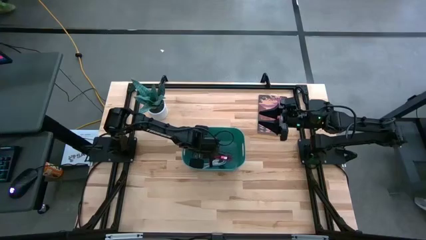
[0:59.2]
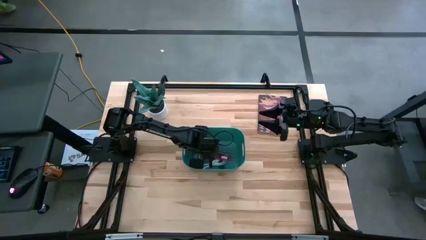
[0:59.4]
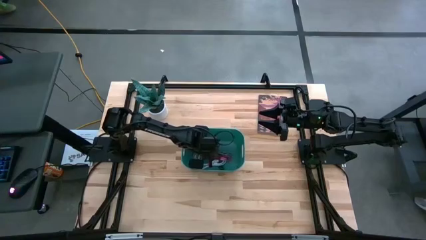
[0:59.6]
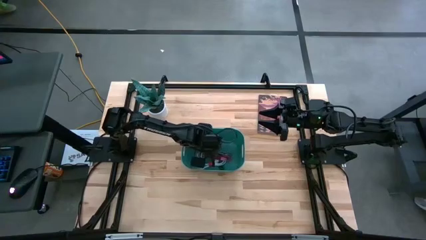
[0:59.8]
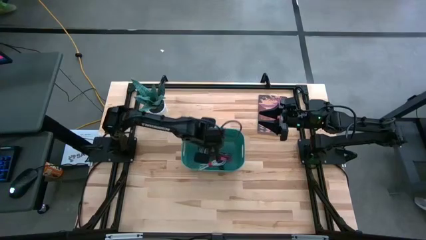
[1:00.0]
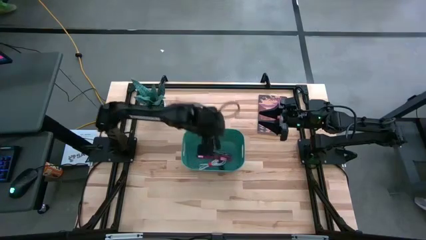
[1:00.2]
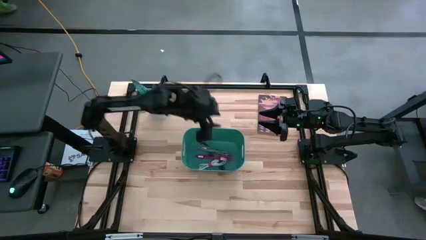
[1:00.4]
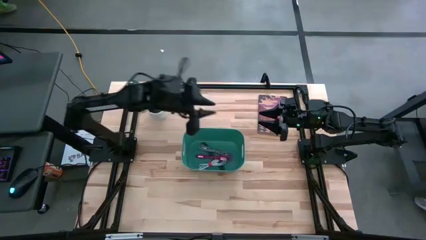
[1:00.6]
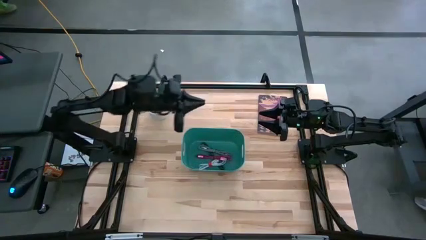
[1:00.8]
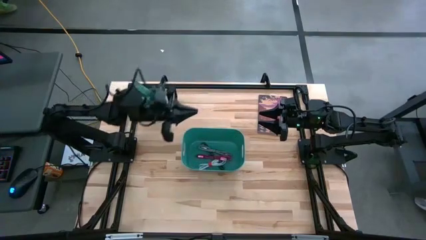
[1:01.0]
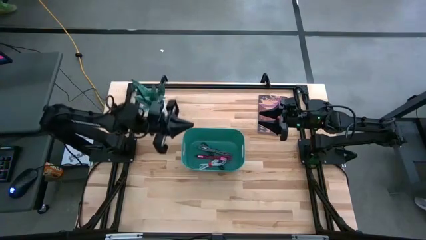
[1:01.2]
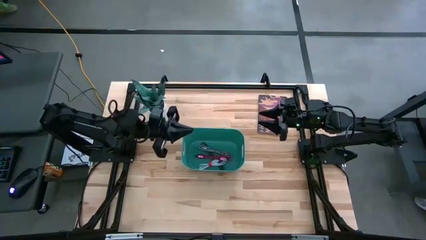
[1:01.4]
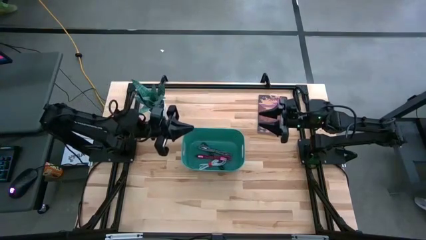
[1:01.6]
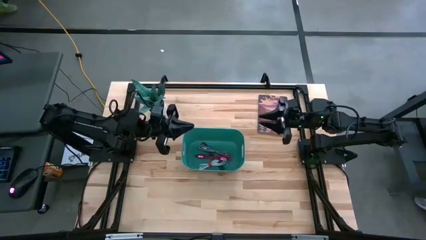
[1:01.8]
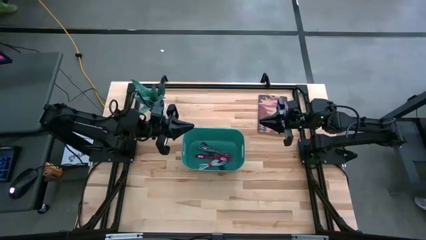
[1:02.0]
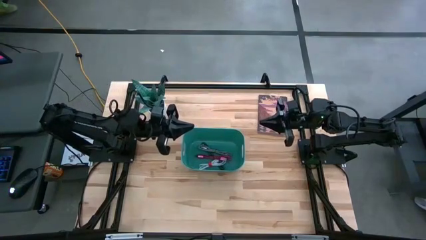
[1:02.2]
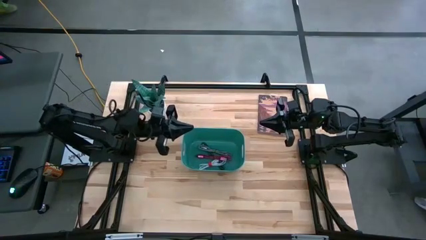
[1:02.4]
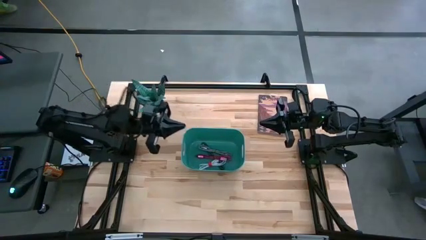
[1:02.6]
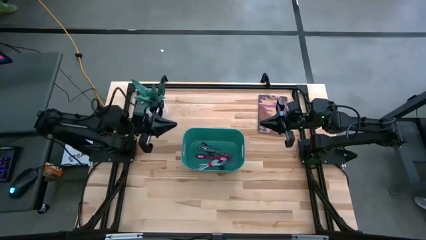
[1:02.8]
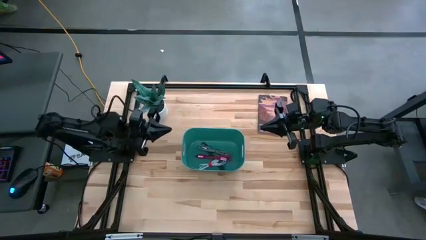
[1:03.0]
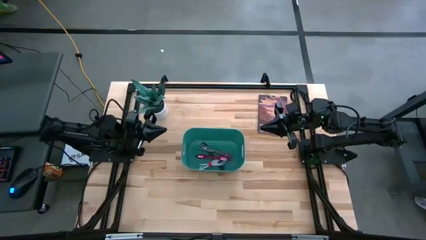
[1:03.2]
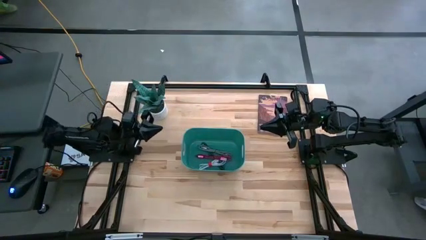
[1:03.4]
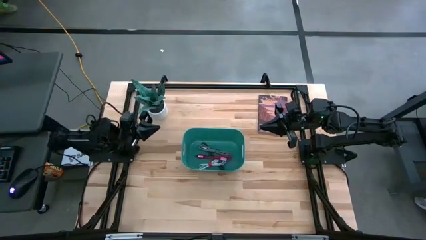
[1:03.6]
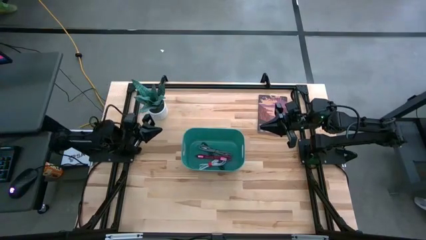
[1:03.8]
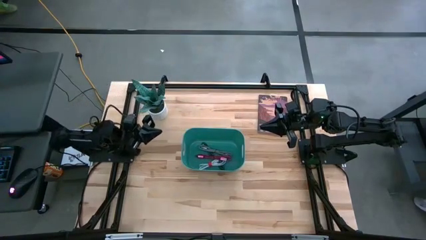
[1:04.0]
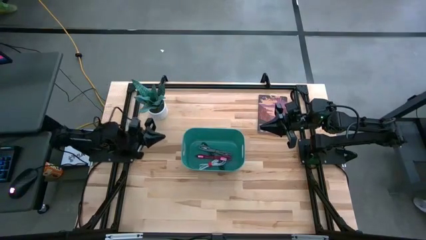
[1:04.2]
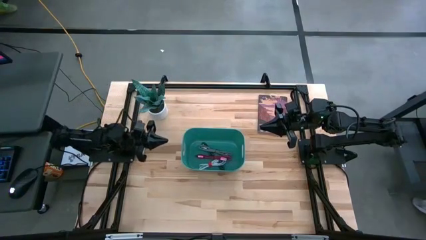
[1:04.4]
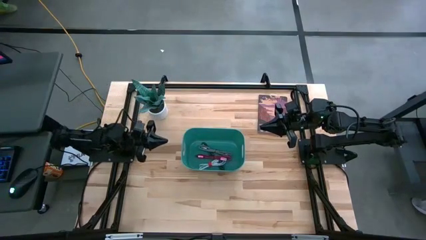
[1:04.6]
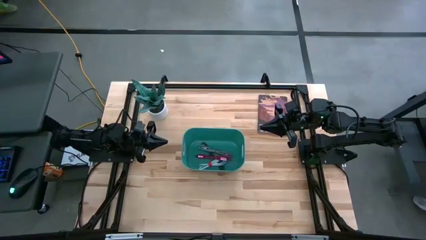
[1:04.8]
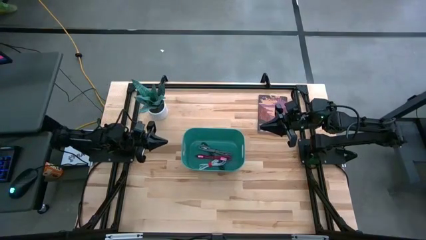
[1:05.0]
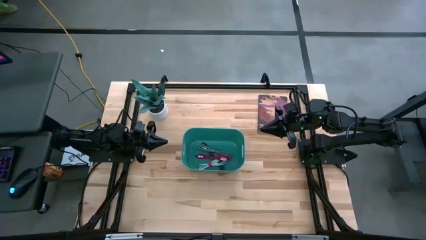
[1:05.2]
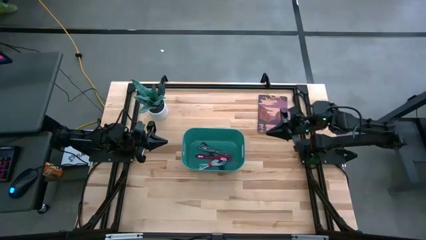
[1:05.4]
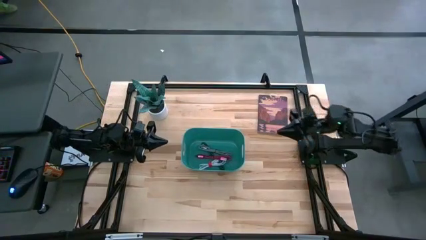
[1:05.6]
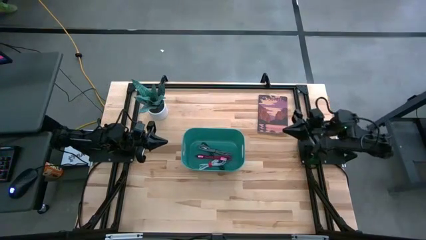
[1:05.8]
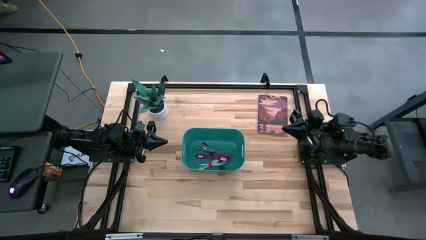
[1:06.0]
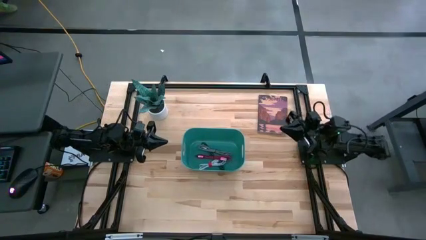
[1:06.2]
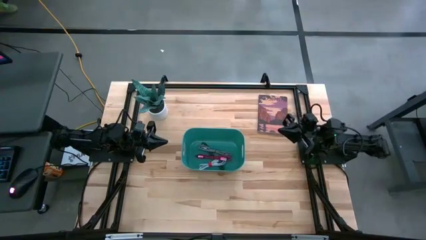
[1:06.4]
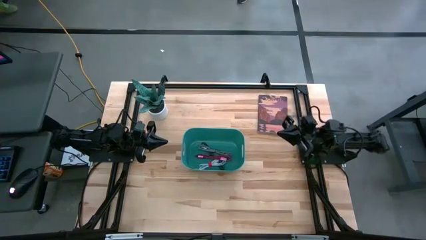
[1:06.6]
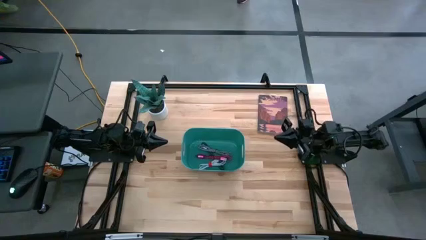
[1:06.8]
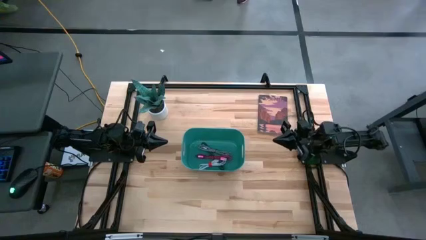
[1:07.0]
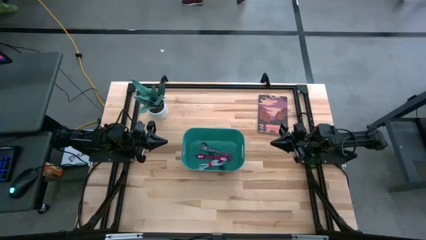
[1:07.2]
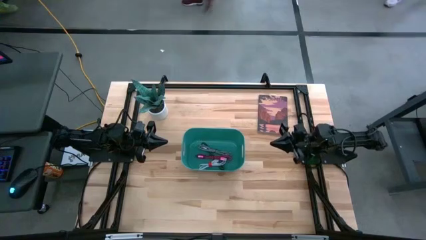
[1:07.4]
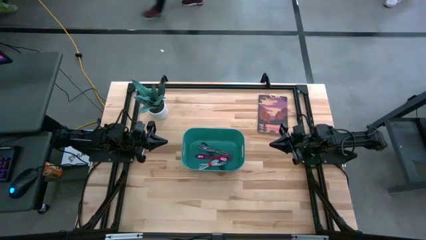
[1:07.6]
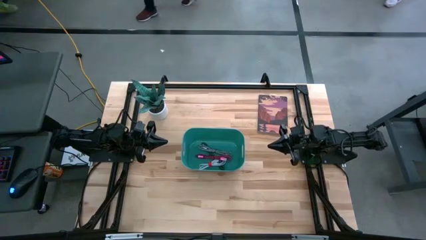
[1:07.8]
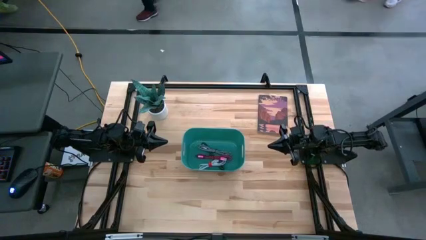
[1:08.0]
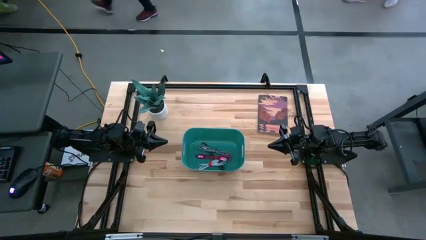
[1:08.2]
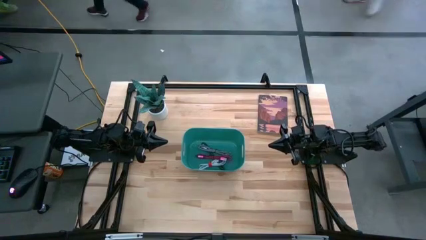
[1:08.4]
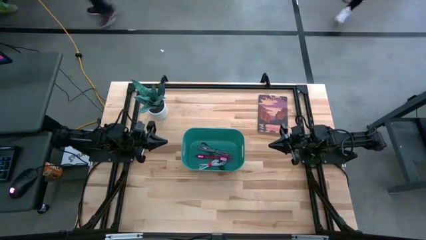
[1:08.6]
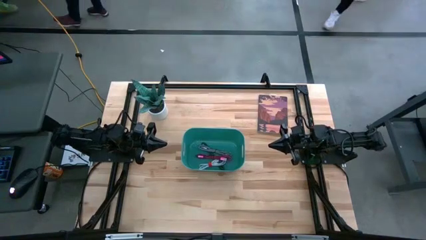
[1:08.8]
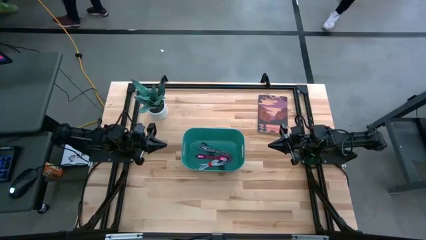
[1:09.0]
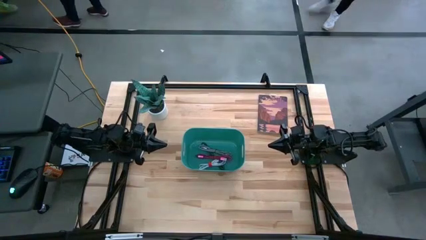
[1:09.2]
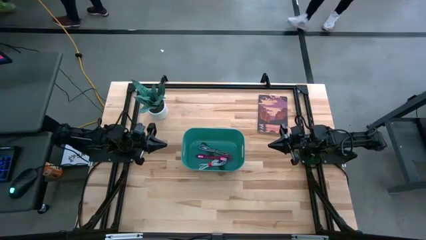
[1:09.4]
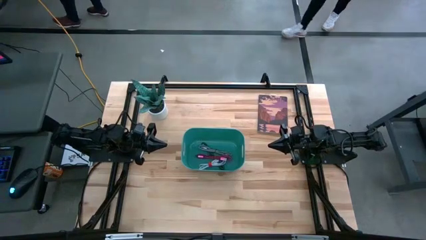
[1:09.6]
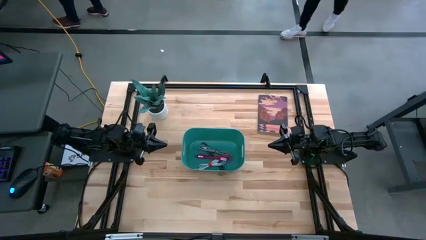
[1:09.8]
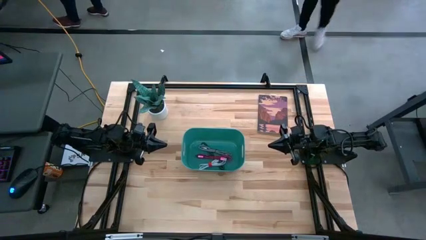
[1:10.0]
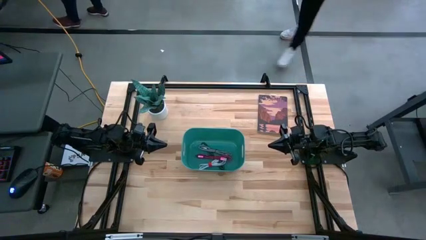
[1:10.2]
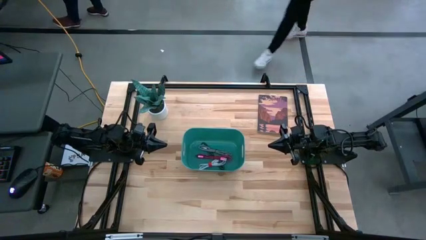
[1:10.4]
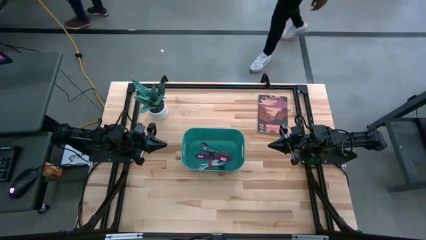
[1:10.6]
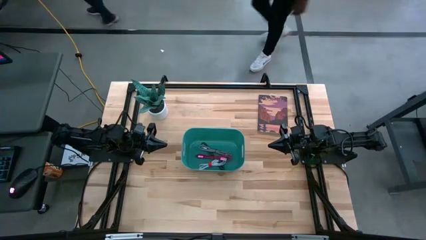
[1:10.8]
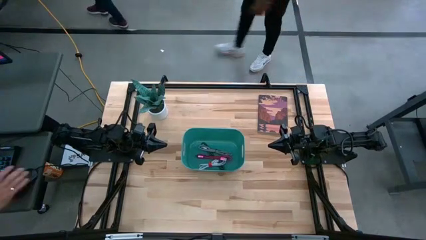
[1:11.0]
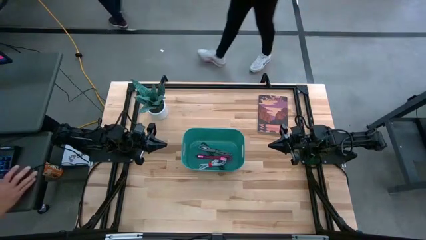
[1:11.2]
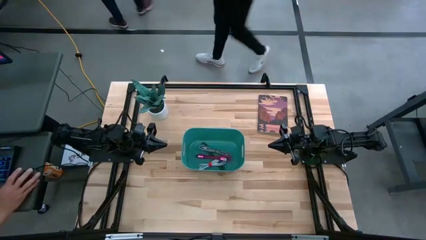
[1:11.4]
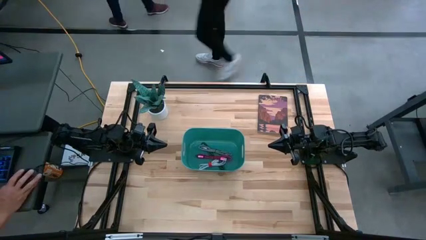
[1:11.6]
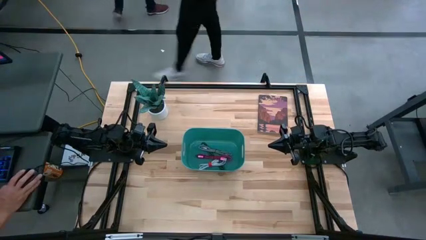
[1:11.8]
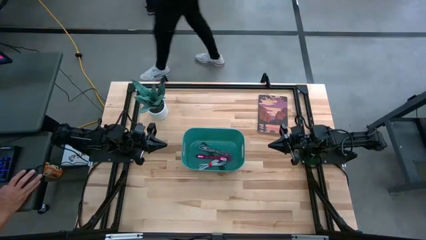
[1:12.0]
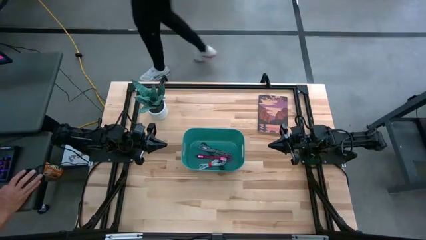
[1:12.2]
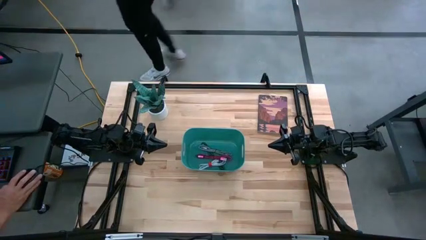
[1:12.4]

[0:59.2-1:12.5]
Task: Pick and place USB-C Cables
Return to Home Position
